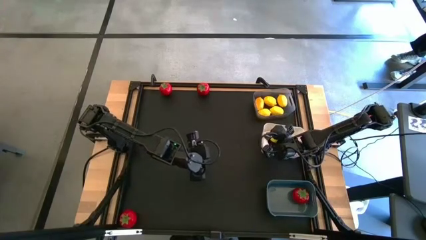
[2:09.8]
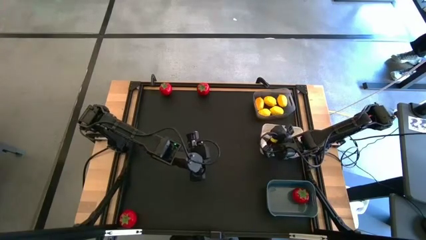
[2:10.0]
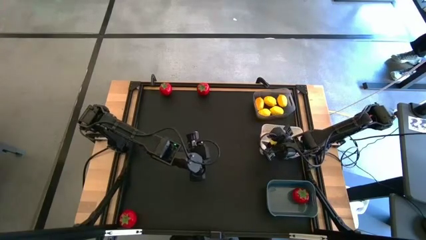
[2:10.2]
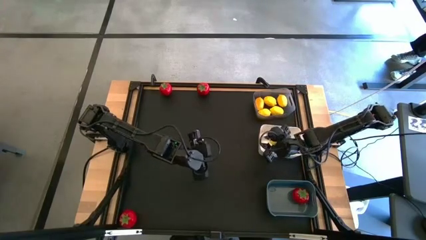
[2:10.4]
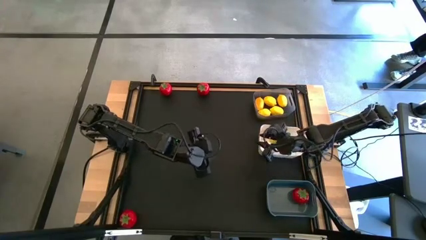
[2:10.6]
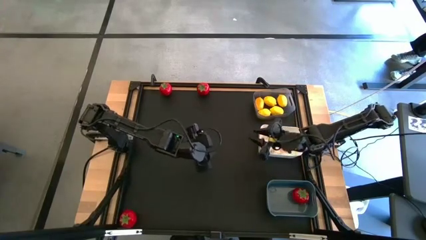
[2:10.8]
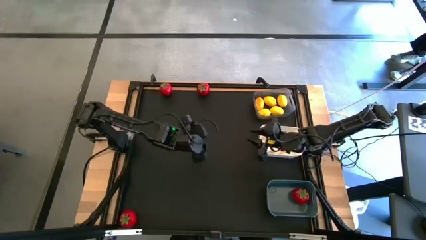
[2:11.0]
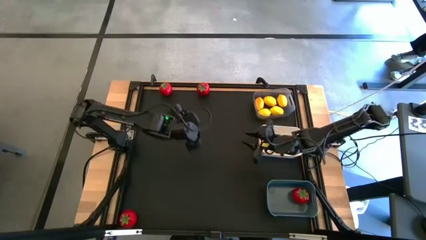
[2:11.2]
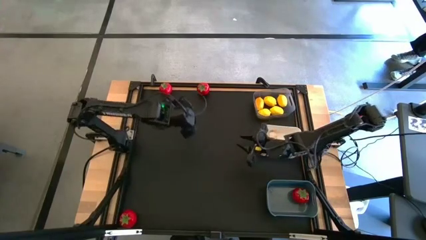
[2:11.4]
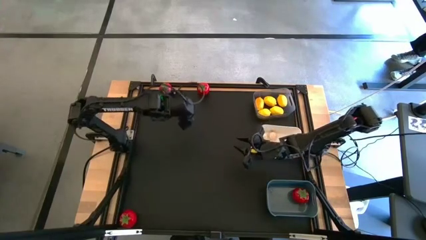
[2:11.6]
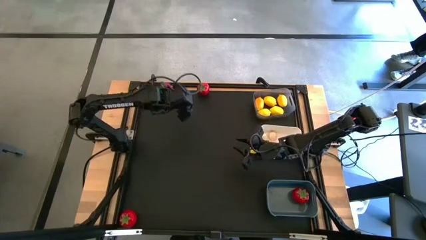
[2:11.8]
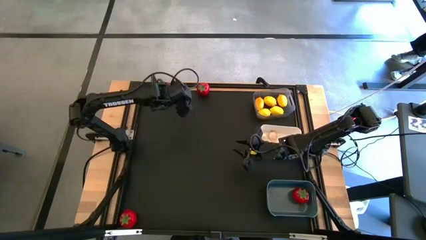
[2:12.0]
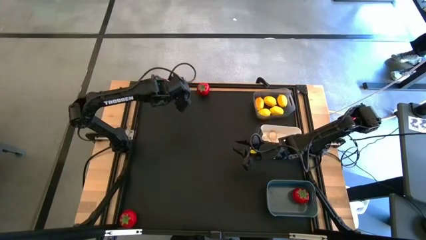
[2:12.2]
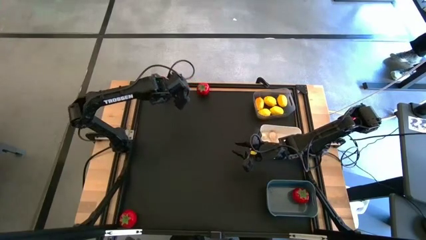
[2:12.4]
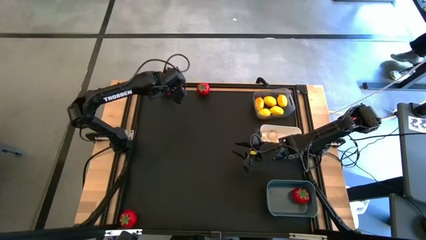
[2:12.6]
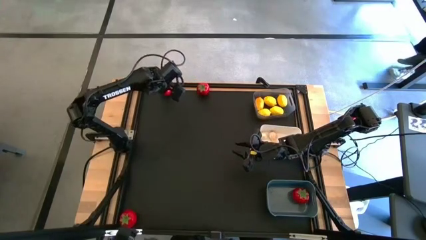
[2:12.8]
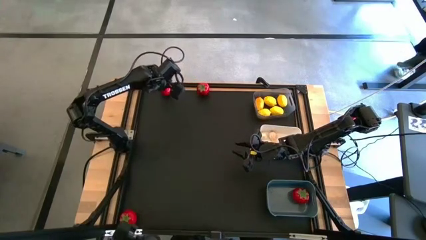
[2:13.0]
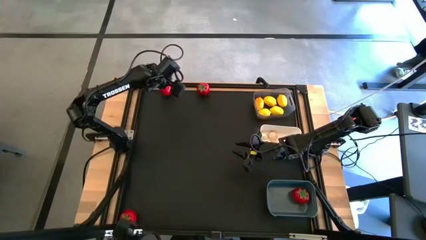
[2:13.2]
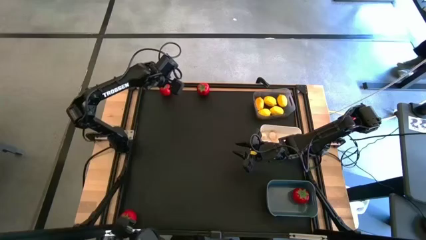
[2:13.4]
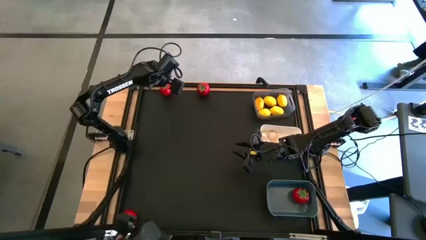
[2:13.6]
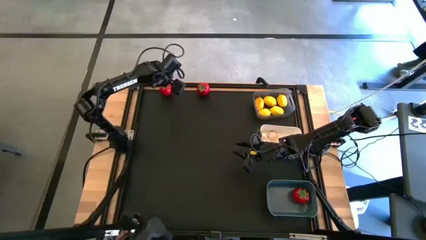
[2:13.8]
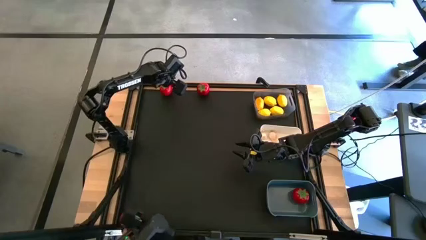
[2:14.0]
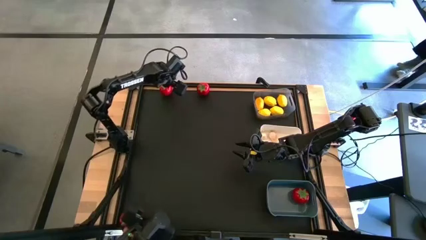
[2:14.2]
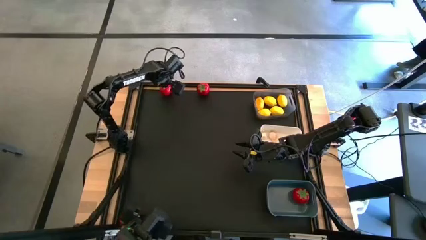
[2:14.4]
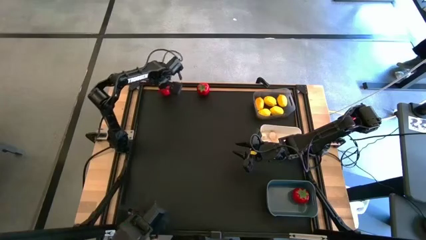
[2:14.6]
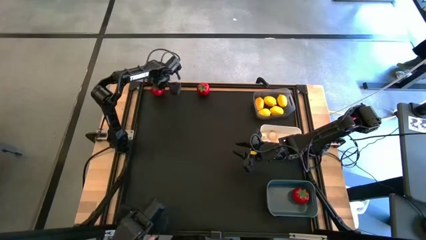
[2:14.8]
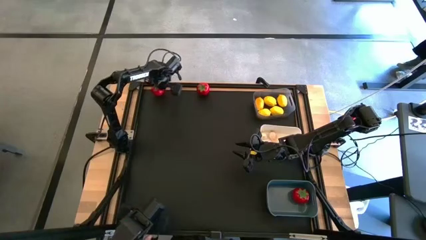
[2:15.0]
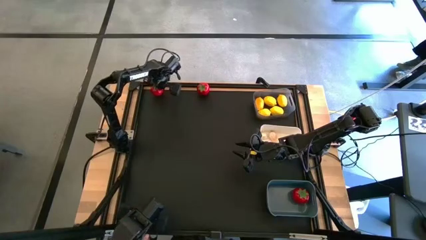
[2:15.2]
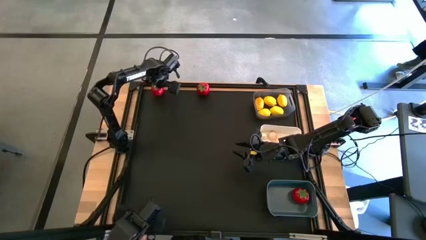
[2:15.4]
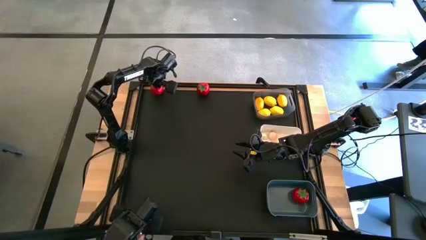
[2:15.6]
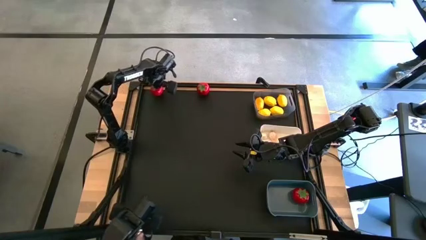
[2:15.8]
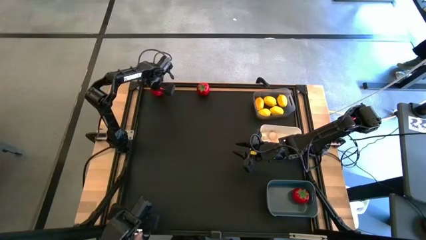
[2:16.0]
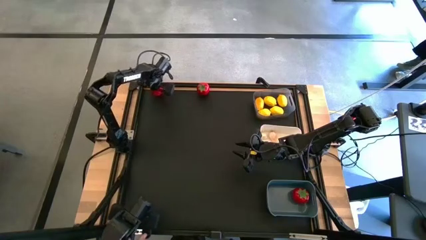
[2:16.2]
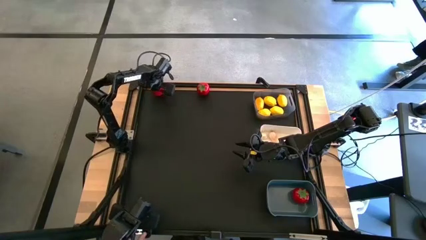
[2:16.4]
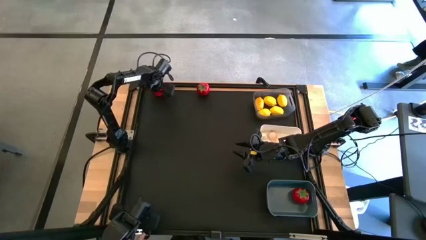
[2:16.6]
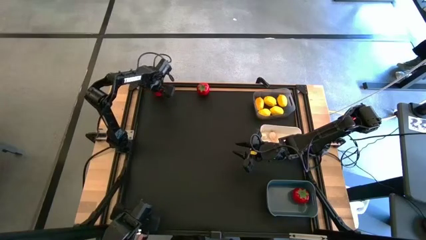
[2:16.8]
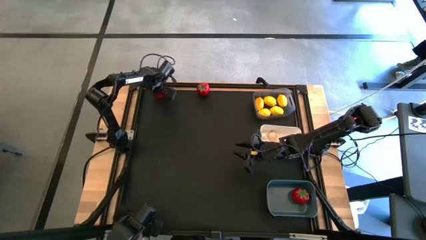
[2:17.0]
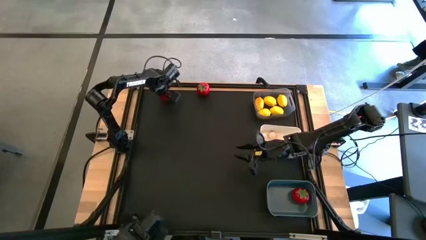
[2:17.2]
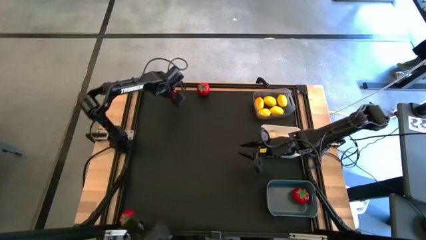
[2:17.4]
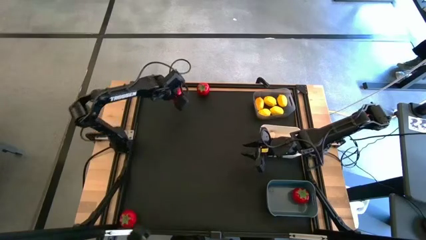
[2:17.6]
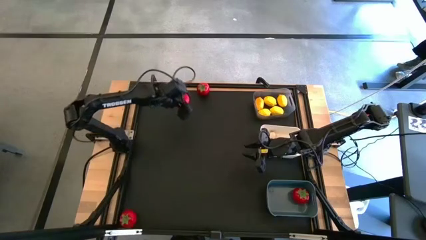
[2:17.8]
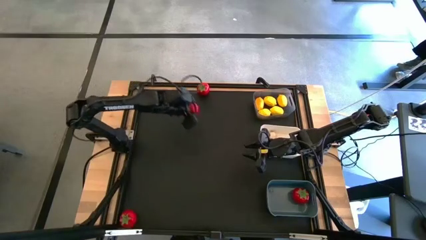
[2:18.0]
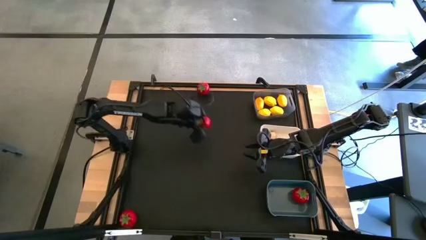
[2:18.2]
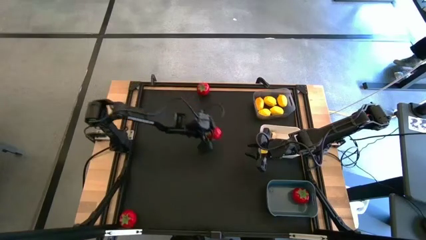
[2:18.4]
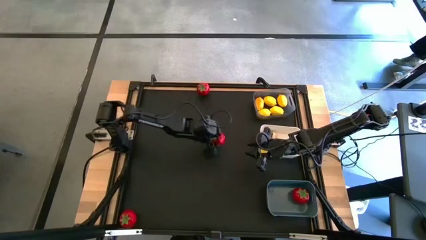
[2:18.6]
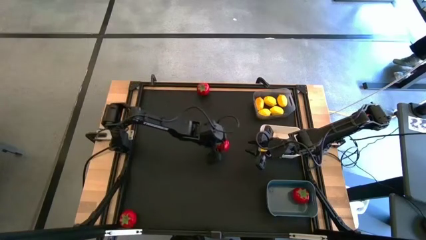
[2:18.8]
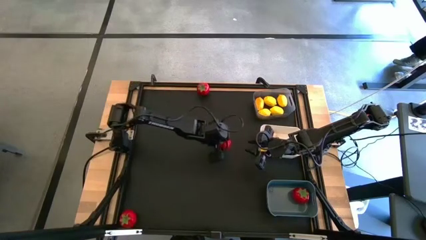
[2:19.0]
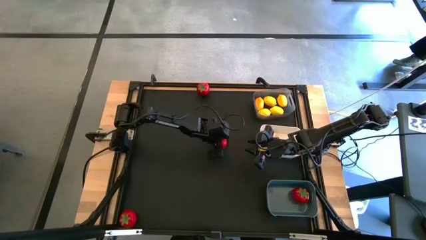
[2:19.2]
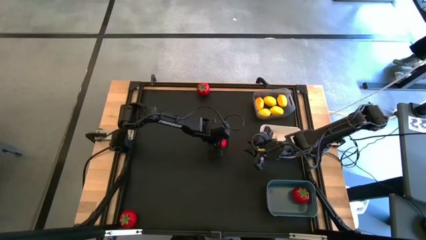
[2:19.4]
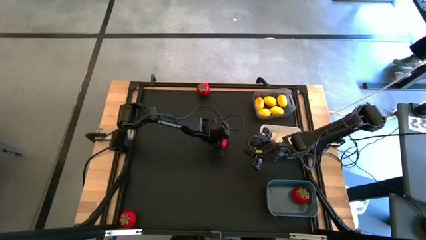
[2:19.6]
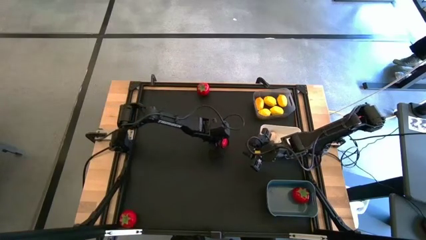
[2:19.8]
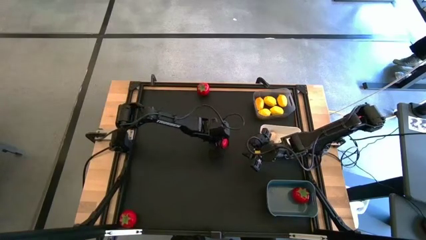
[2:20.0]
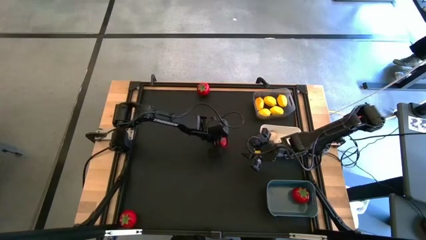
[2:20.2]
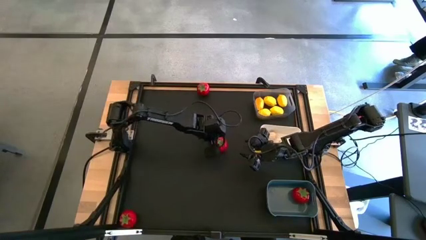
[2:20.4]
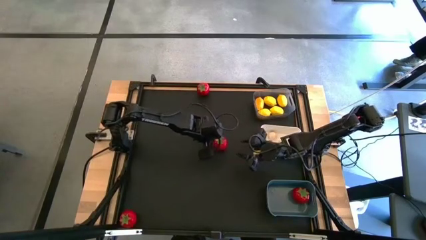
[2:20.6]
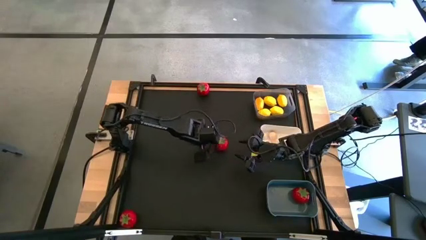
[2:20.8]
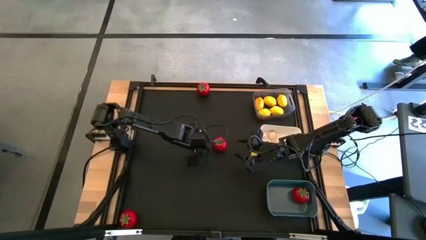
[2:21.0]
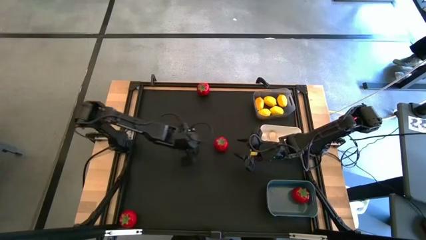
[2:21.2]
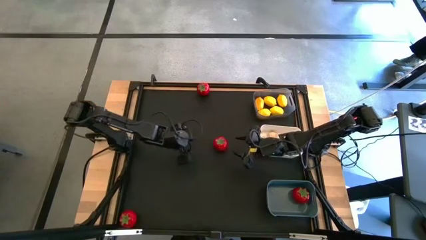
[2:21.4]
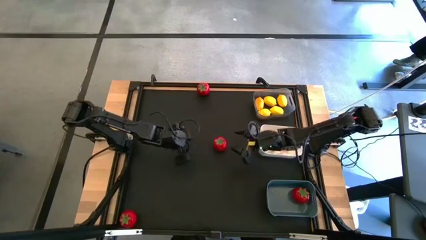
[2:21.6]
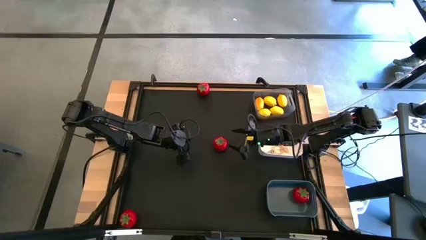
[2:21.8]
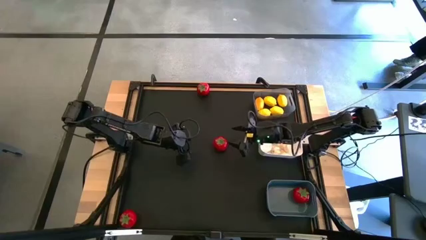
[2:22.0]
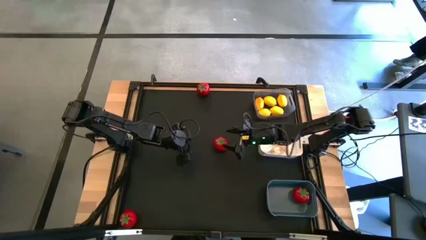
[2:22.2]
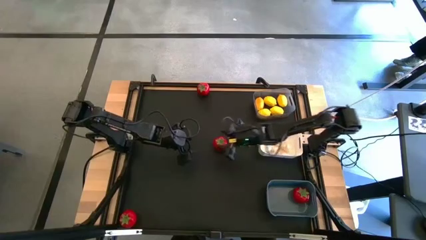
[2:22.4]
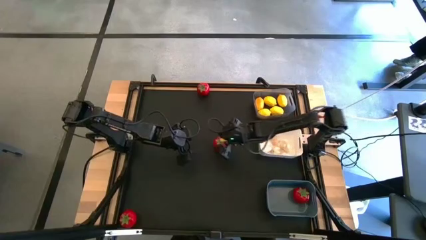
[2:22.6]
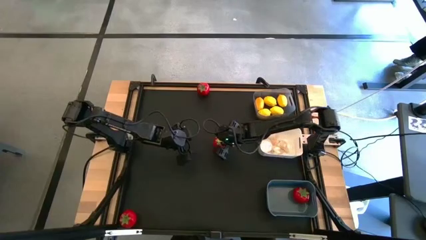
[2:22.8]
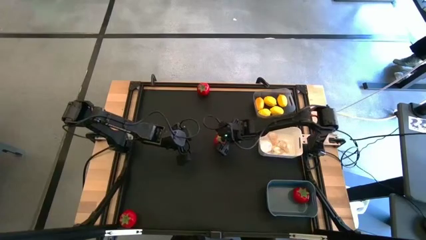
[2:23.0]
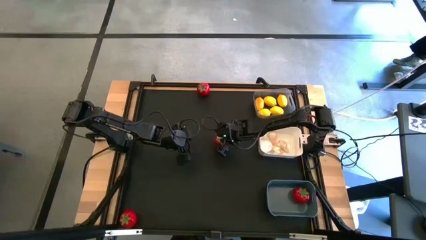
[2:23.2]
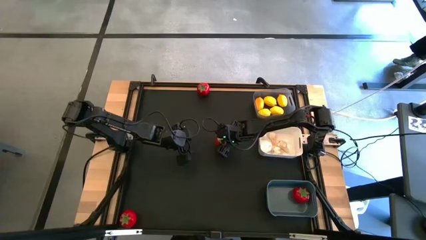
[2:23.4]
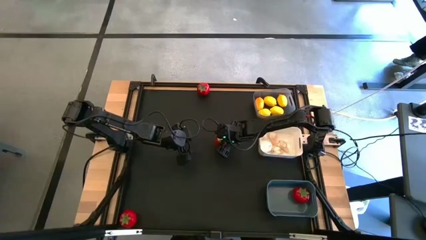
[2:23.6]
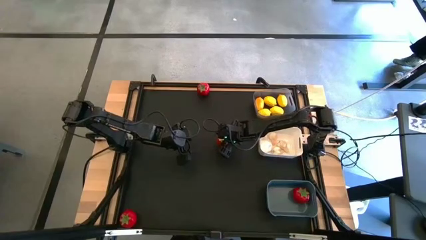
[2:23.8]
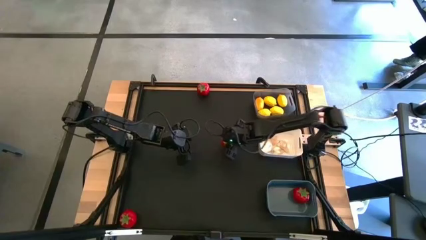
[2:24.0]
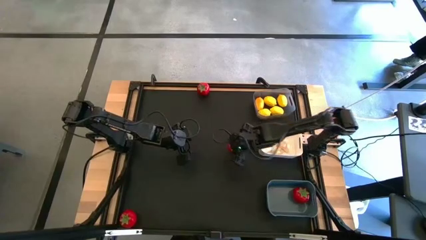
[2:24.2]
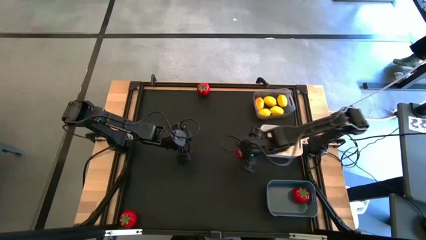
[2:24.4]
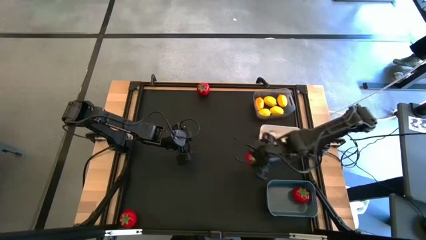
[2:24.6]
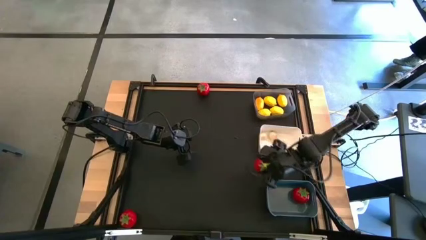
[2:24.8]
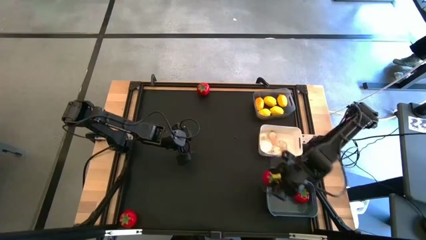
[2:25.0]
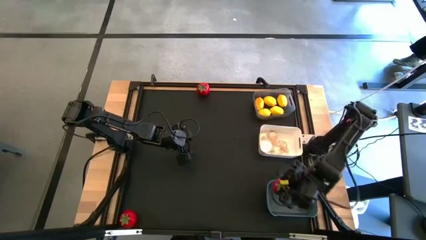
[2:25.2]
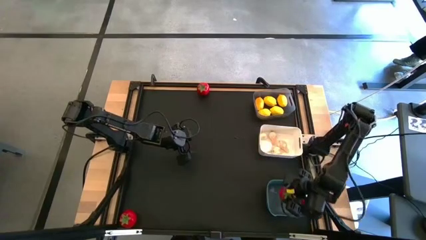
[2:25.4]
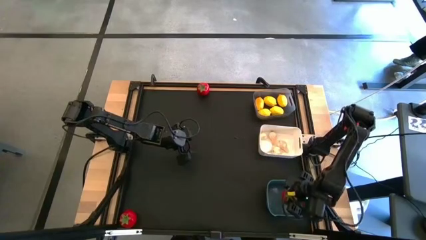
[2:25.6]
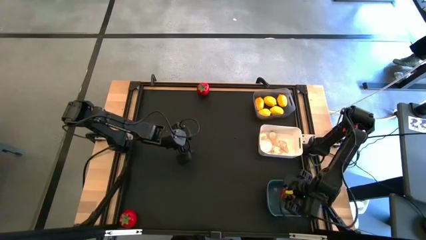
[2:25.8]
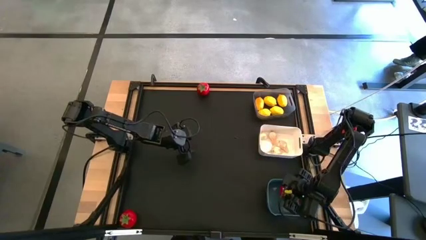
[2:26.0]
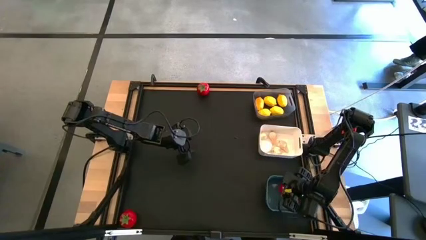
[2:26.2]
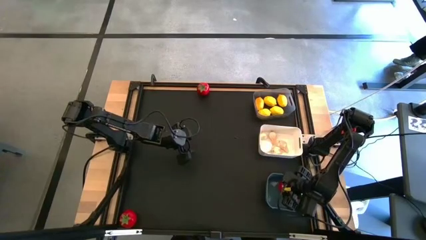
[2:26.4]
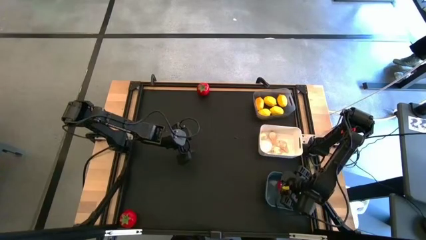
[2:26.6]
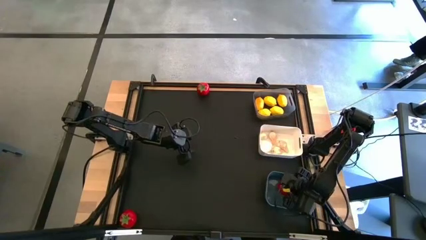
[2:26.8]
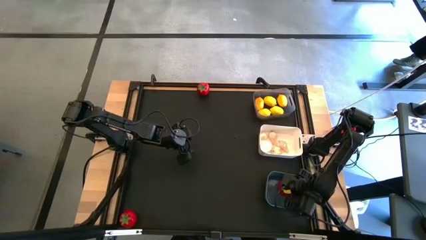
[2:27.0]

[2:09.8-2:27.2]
Task: Sort produce into baskets
Put the tomato into the the blue bin
